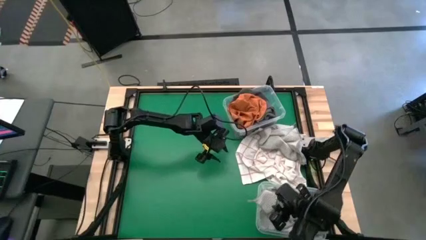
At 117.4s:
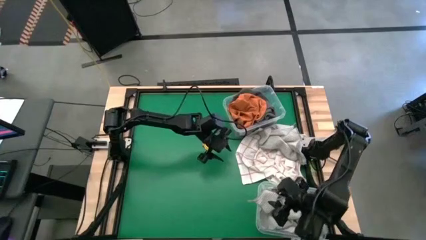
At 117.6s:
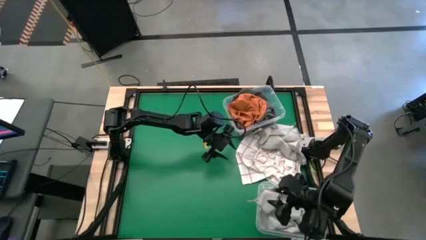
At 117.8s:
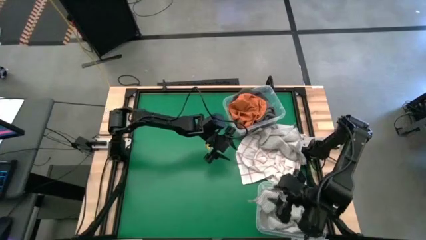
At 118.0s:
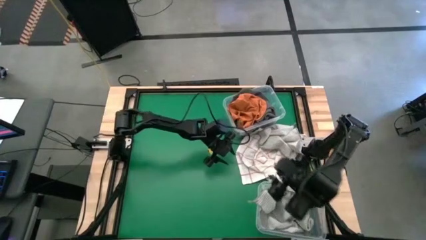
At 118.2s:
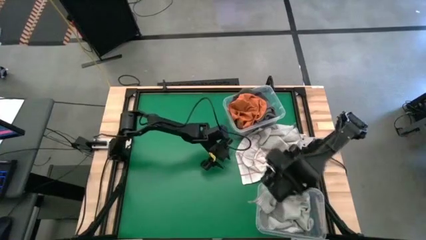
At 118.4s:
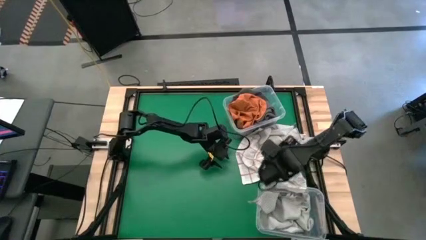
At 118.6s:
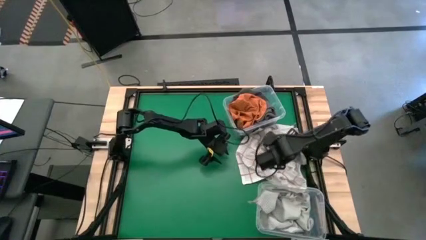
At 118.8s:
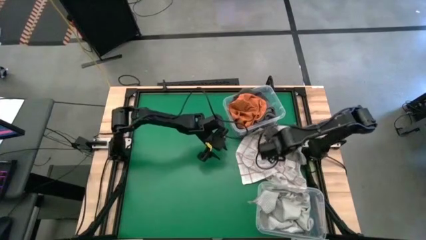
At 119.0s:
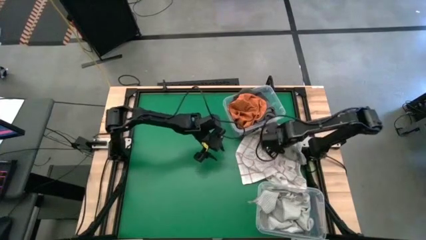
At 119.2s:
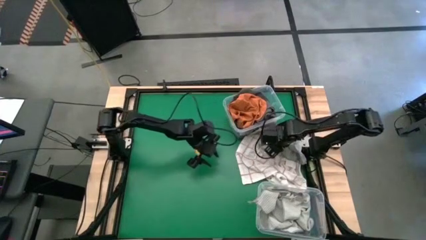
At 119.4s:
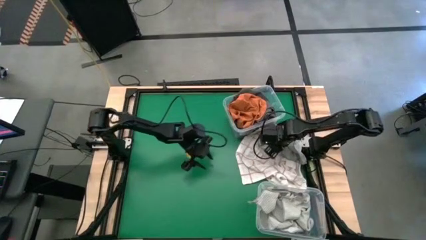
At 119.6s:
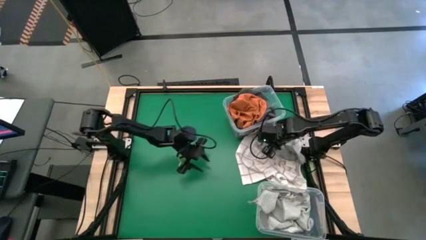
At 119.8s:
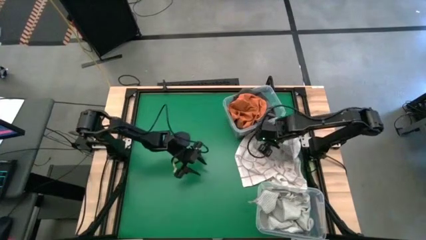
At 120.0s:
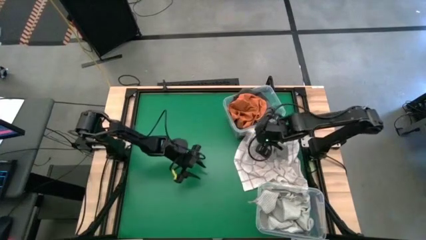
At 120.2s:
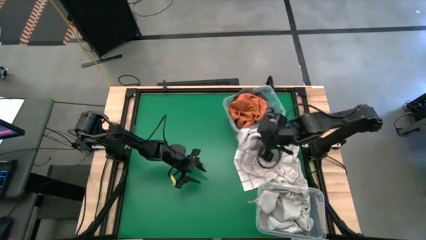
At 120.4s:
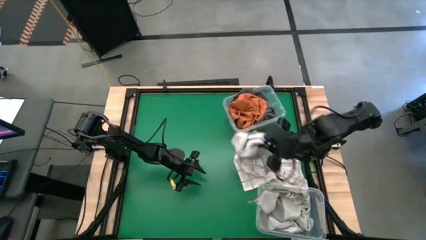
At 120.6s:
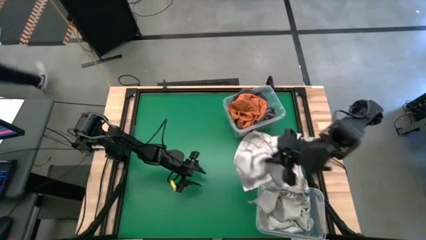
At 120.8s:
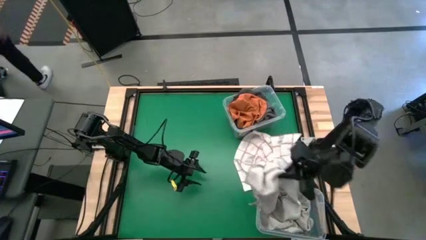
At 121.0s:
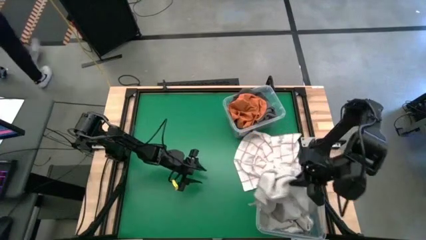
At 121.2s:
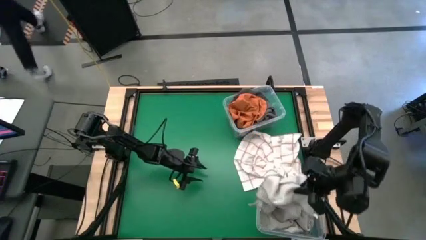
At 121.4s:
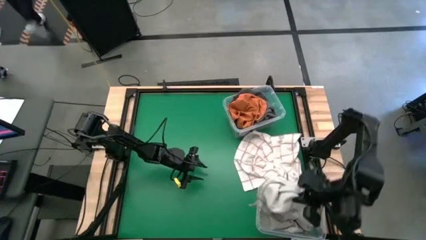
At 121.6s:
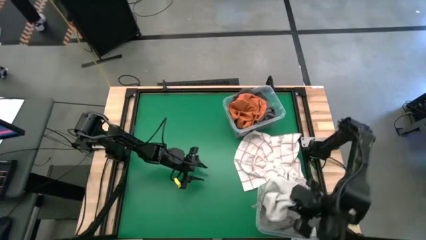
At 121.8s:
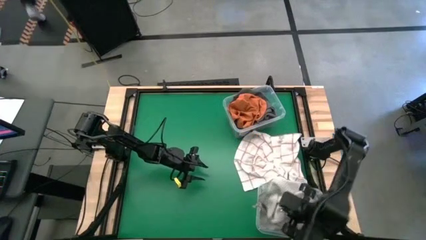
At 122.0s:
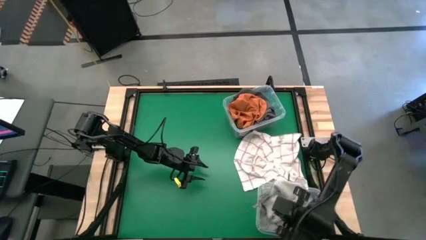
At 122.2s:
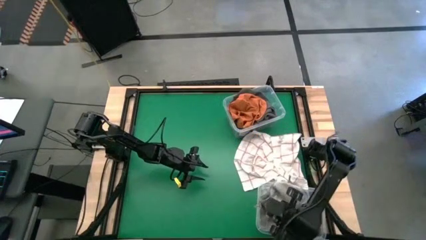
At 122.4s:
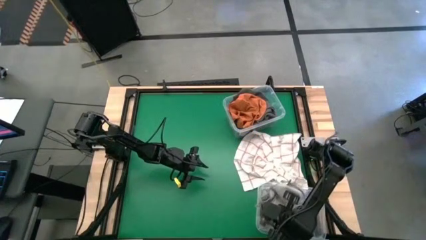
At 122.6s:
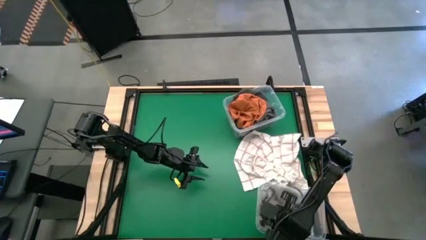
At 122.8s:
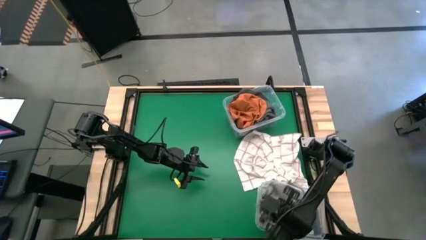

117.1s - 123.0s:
Task: Sort towels by color in basket
Put the light gray towel into the bottom transparent bin

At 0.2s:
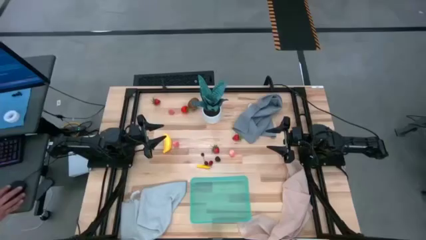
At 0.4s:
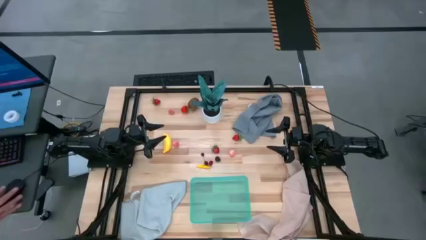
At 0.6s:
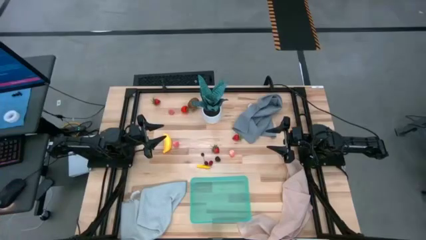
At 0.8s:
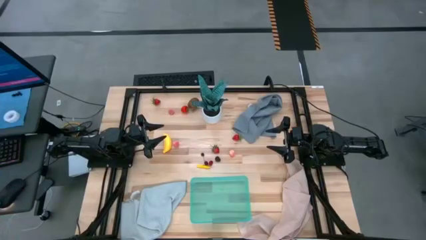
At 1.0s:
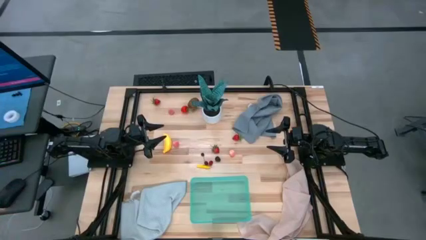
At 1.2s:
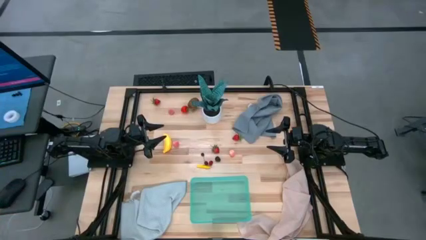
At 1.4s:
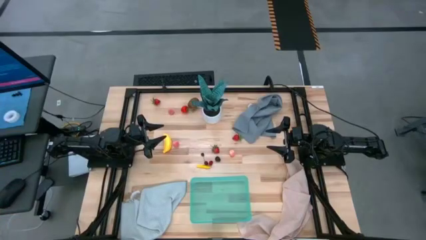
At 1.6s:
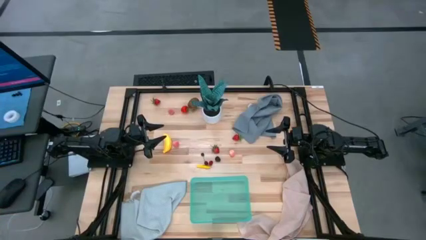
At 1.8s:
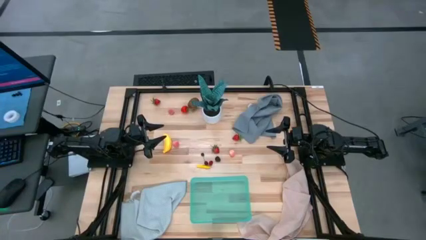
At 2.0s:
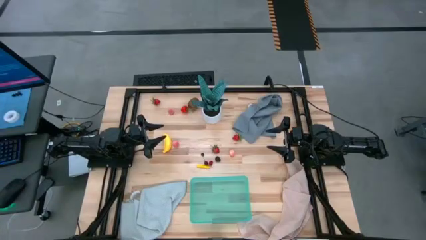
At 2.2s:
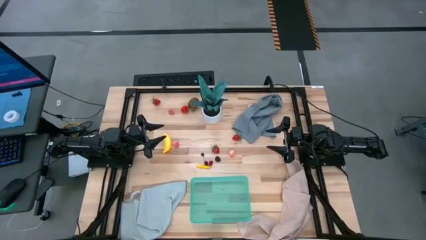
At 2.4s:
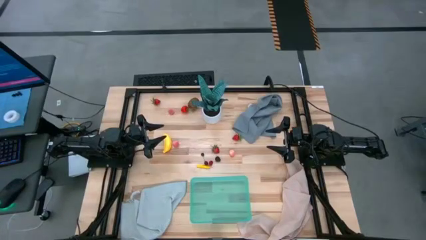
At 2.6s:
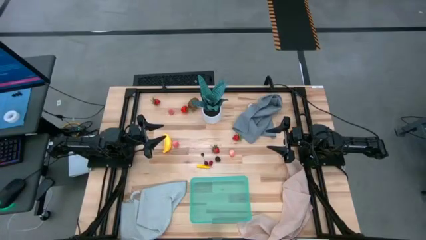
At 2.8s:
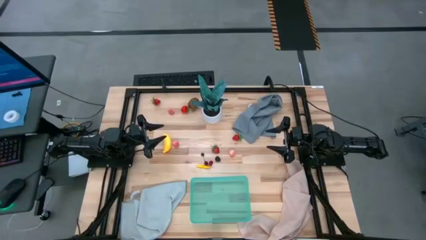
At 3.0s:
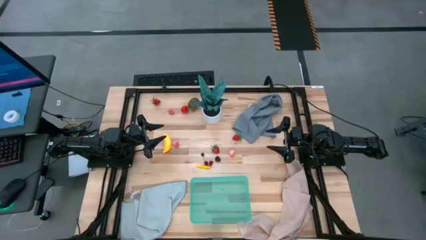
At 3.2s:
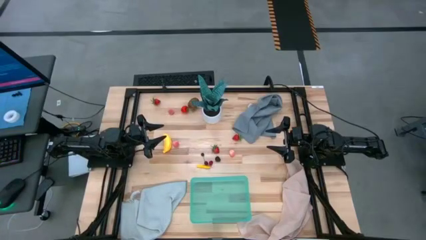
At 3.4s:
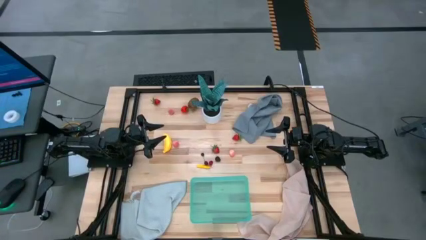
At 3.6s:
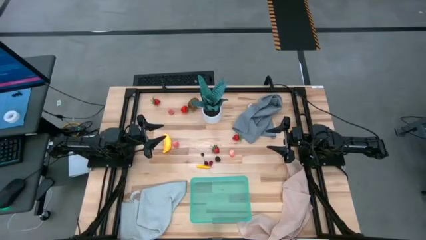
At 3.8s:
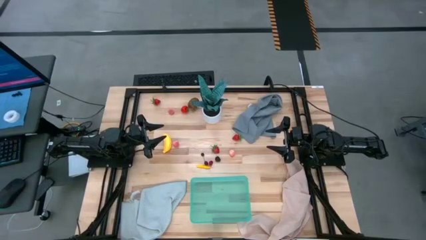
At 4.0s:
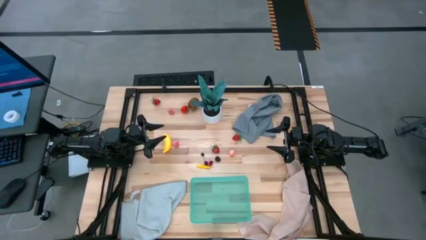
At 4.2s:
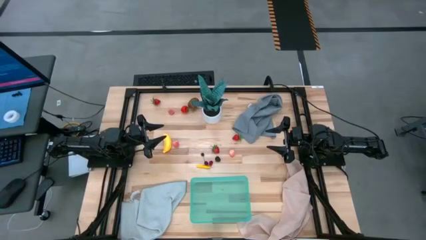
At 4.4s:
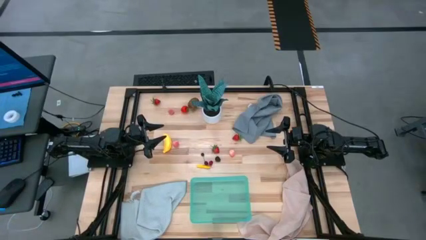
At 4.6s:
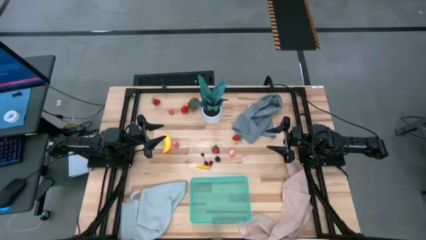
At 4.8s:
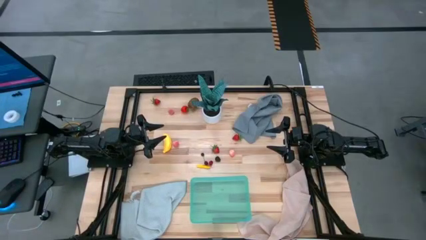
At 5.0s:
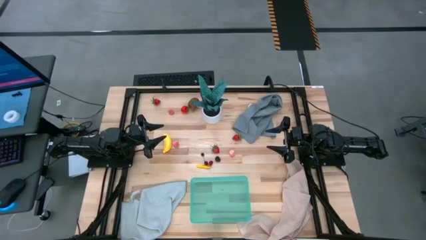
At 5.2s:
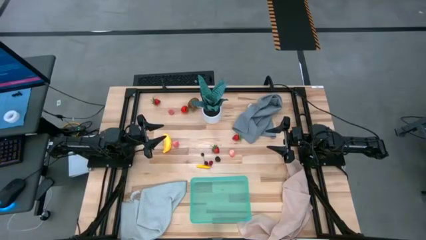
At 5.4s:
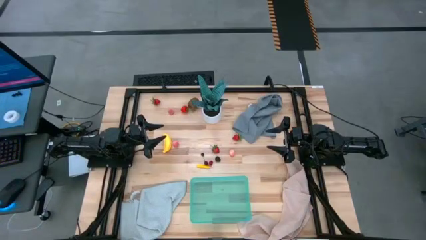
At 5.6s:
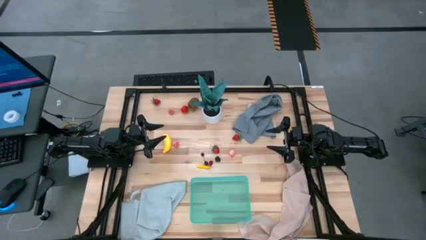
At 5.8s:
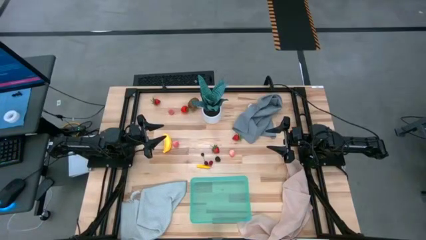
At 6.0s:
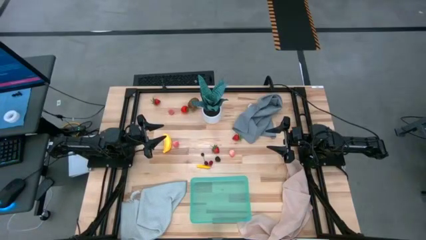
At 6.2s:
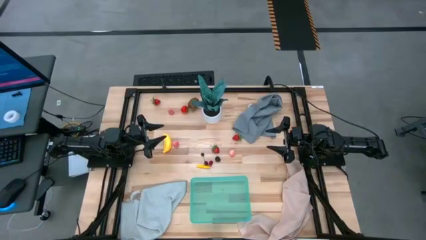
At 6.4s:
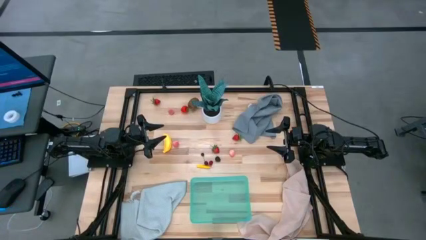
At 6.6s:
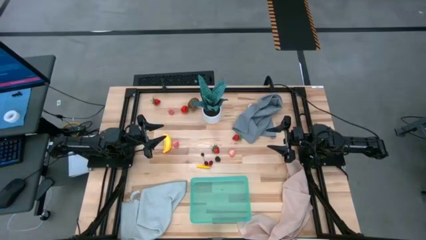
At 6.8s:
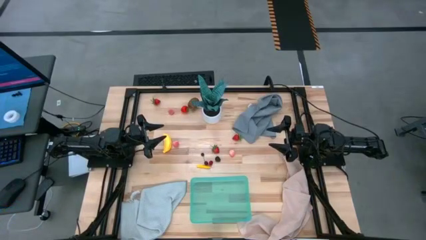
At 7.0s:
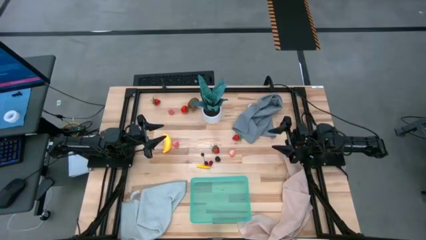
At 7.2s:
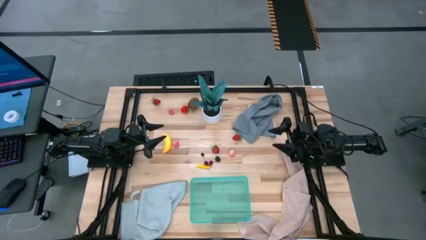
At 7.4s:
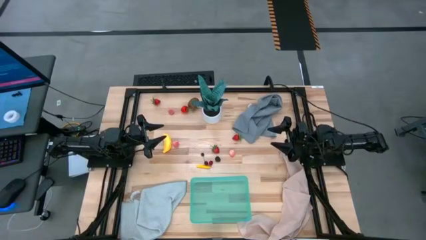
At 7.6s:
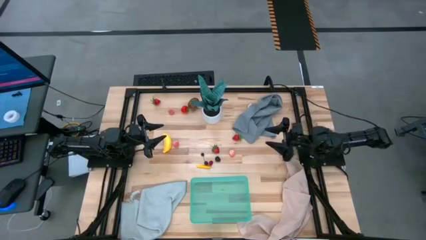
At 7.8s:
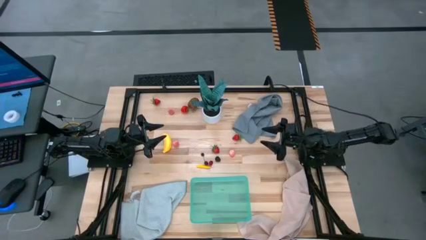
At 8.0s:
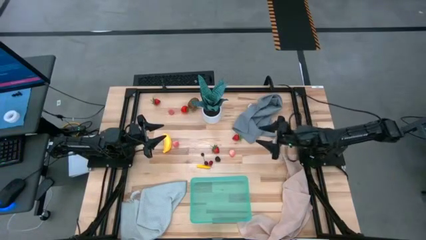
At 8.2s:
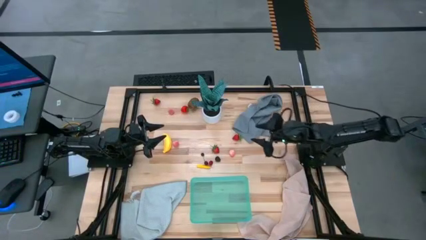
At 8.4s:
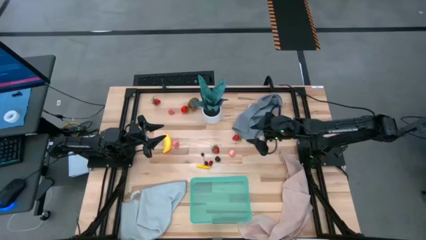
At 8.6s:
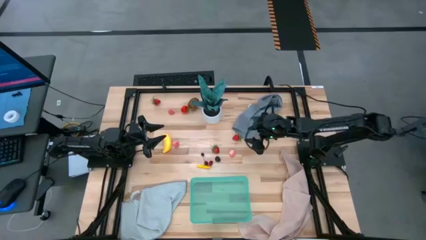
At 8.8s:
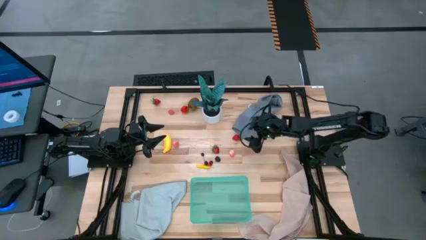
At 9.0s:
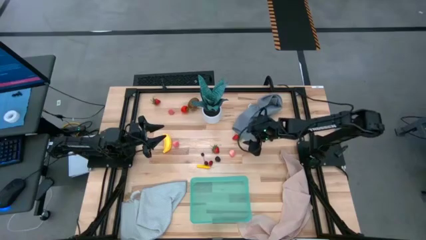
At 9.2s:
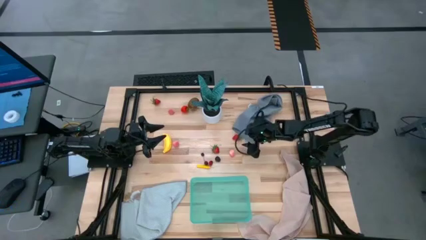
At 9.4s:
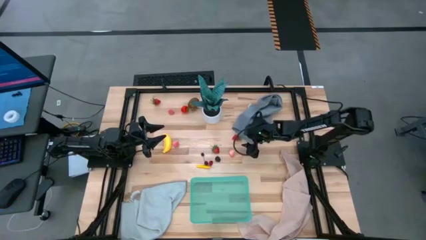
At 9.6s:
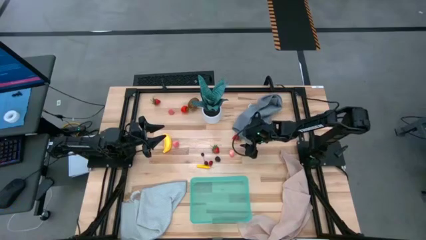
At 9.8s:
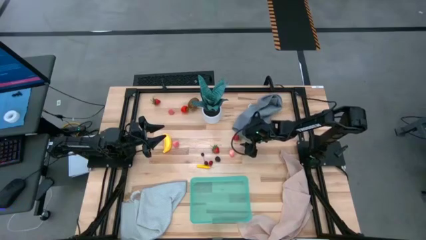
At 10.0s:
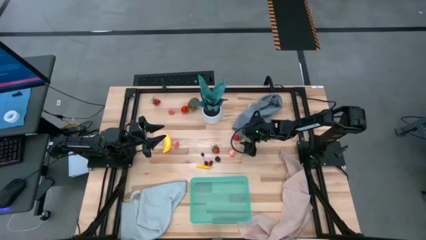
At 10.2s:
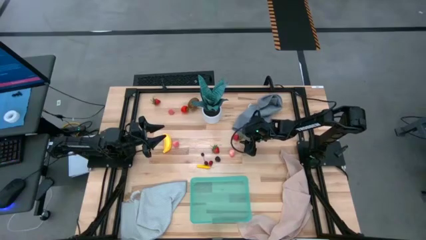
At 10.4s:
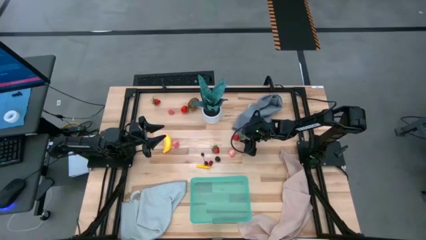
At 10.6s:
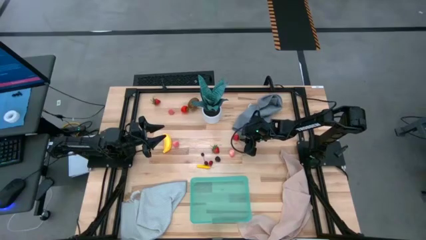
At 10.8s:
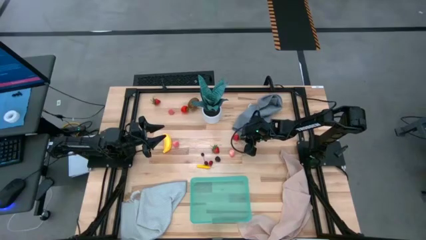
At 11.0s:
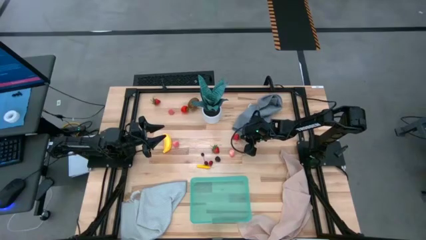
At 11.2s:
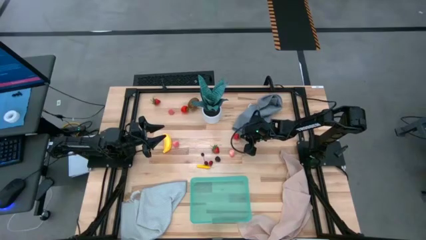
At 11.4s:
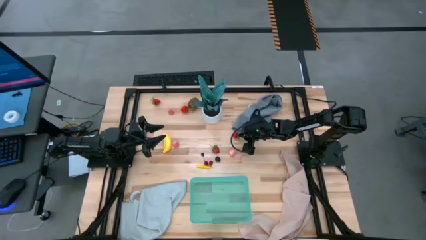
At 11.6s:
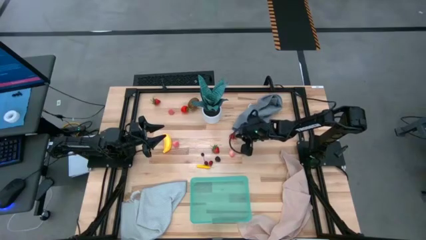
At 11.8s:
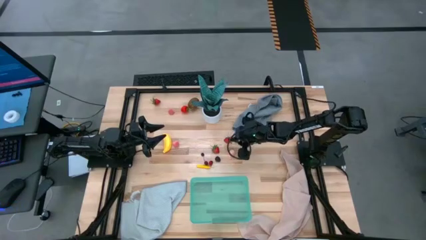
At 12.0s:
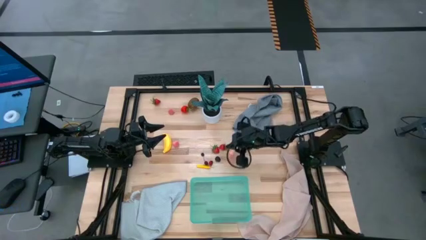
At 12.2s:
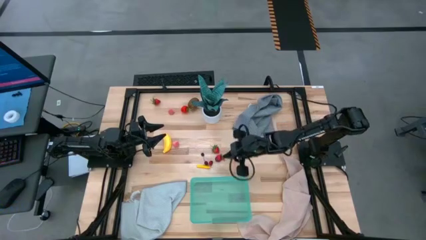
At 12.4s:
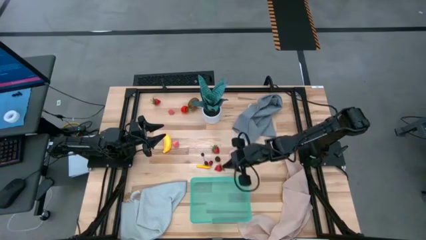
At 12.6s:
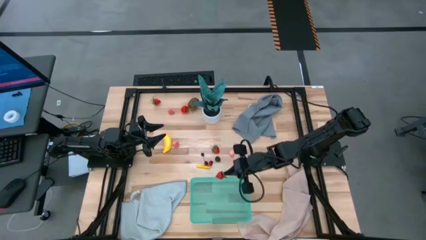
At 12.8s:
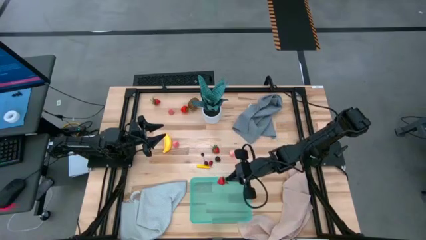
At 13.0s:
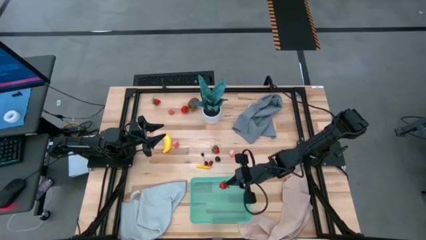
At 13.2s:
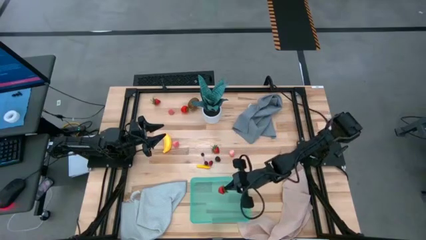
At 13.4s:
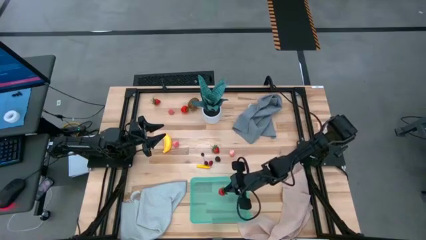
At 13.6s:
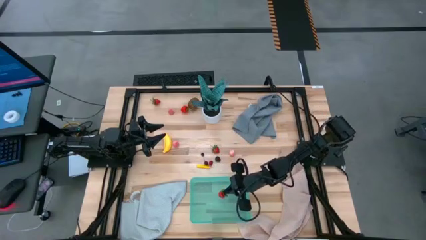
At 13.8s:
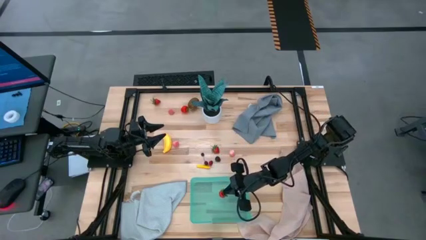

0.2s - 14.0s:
Task: Pick and placing Produce into tupperware
Put the red strawberry into the green bin
